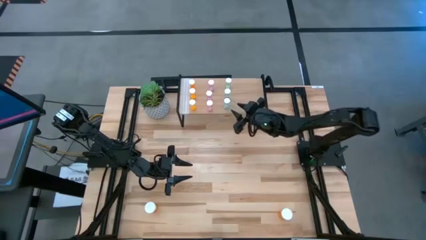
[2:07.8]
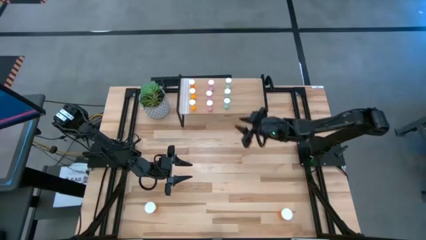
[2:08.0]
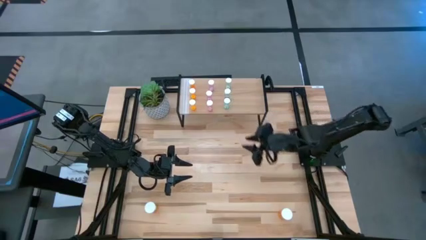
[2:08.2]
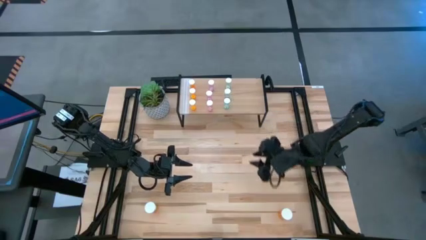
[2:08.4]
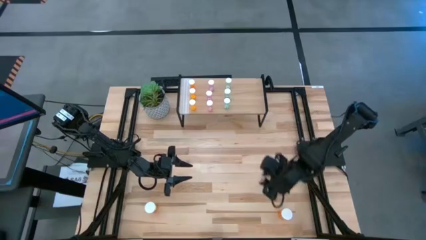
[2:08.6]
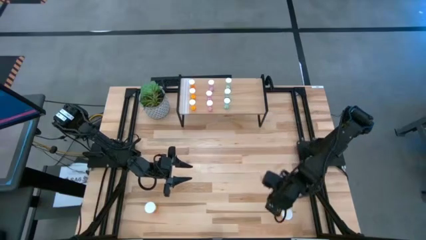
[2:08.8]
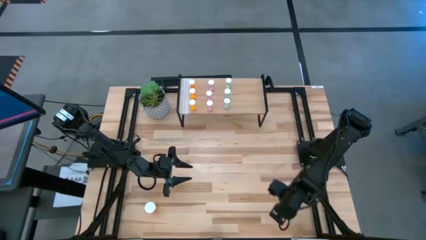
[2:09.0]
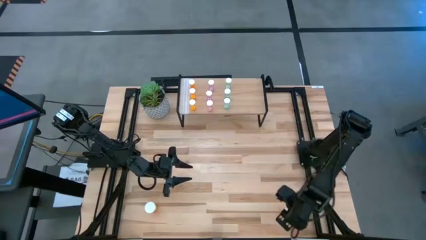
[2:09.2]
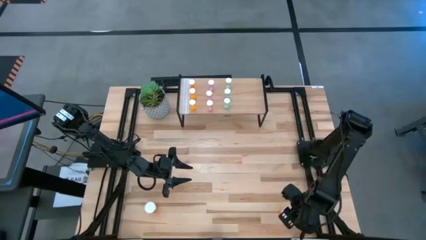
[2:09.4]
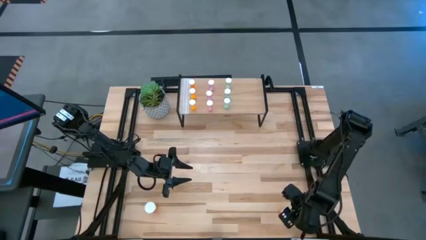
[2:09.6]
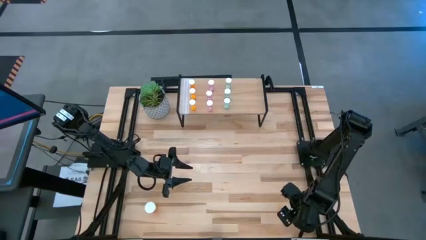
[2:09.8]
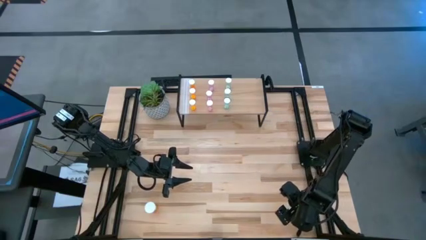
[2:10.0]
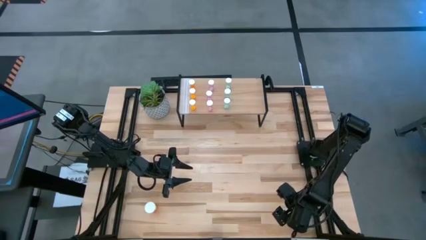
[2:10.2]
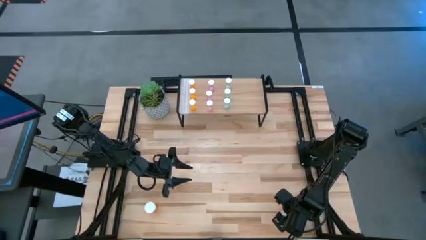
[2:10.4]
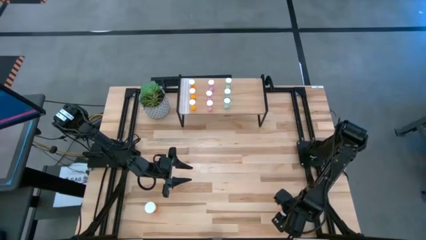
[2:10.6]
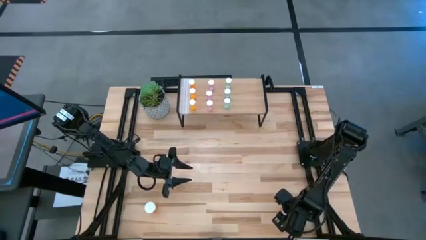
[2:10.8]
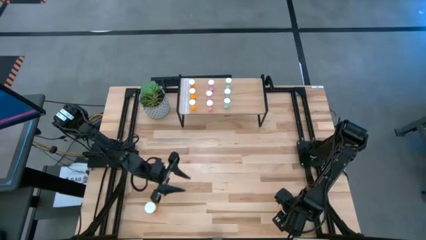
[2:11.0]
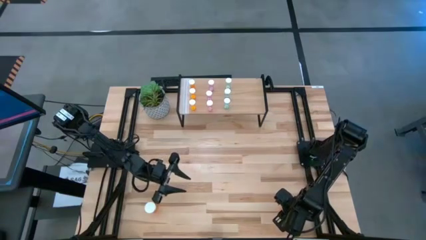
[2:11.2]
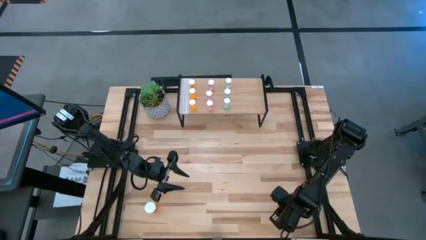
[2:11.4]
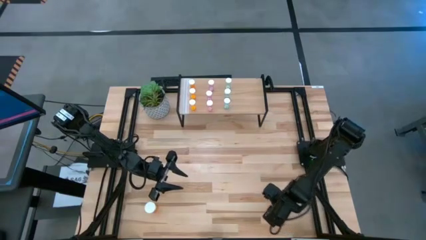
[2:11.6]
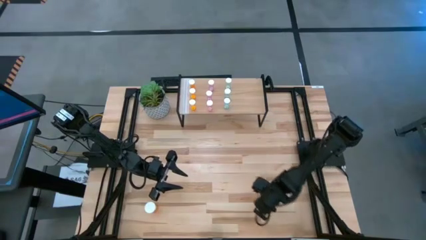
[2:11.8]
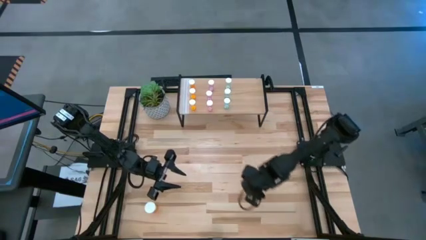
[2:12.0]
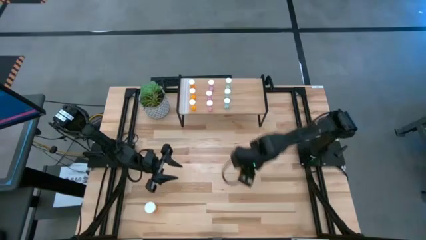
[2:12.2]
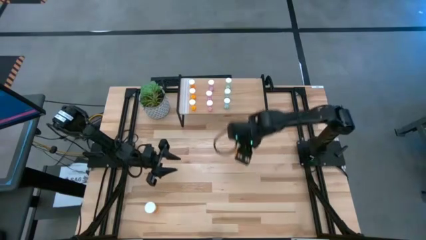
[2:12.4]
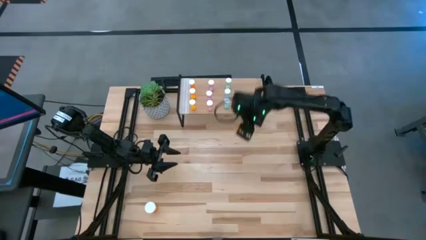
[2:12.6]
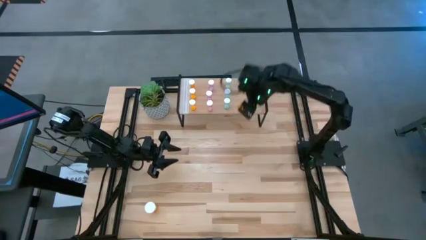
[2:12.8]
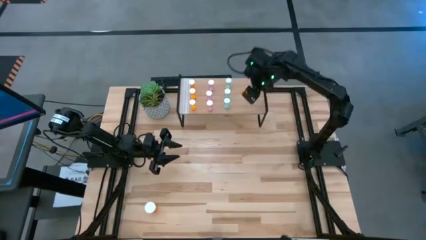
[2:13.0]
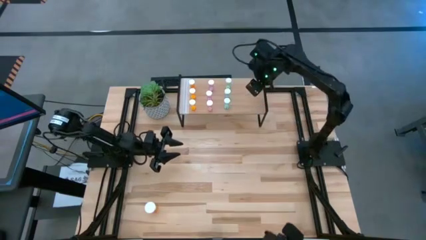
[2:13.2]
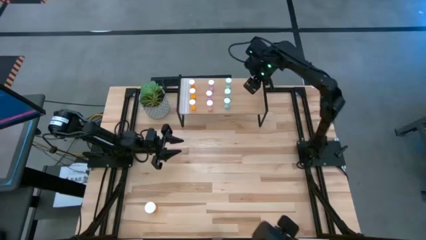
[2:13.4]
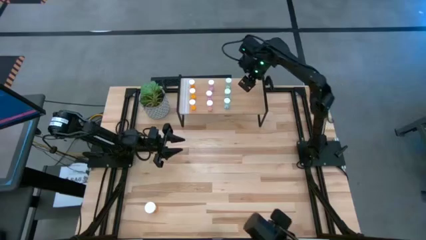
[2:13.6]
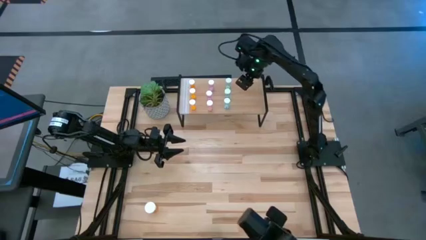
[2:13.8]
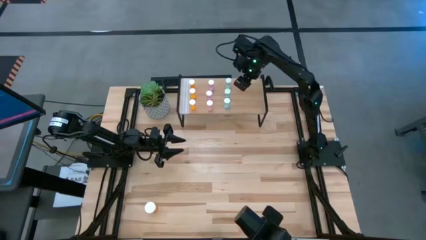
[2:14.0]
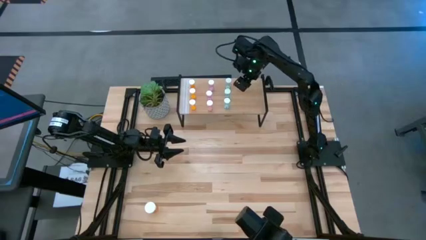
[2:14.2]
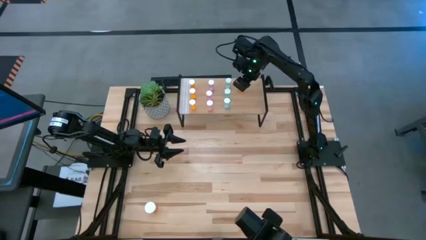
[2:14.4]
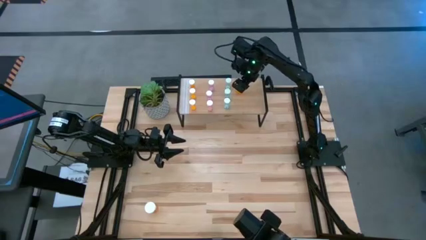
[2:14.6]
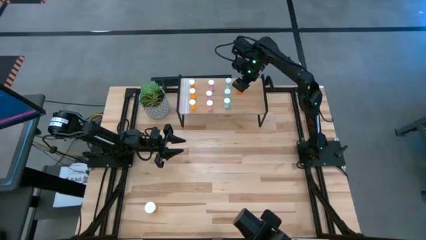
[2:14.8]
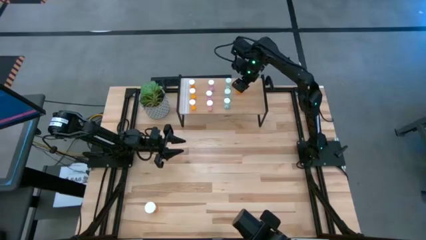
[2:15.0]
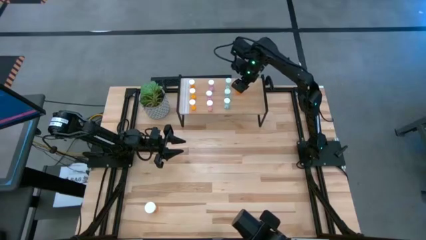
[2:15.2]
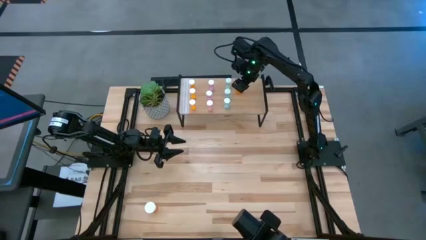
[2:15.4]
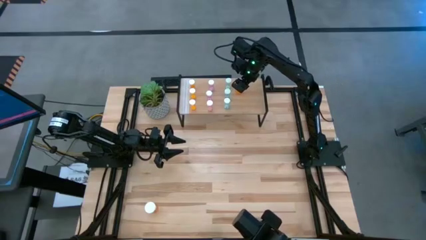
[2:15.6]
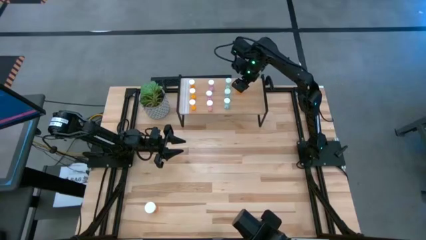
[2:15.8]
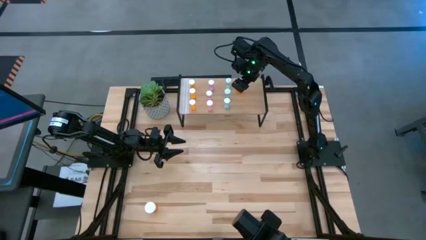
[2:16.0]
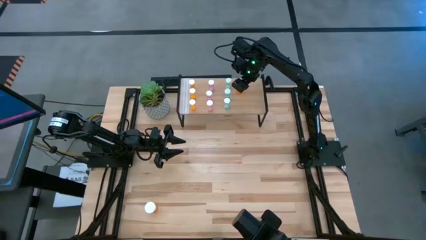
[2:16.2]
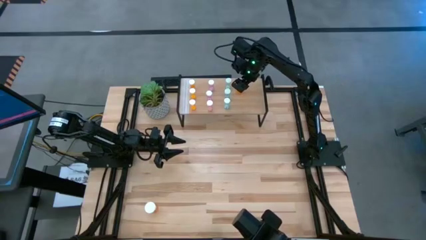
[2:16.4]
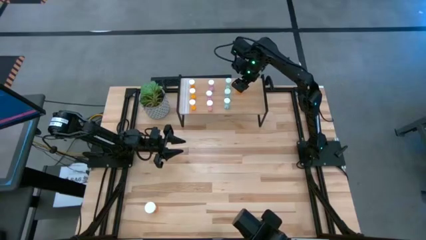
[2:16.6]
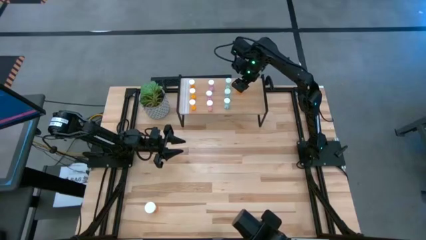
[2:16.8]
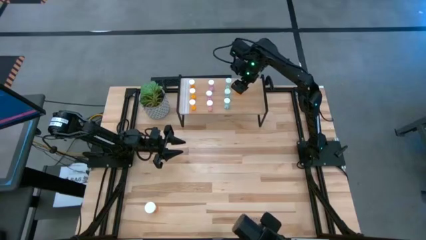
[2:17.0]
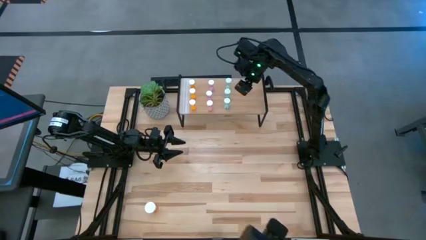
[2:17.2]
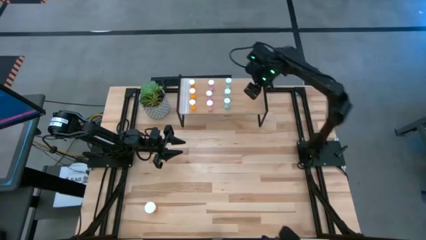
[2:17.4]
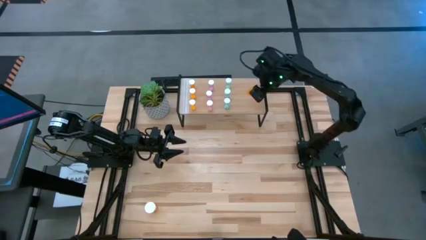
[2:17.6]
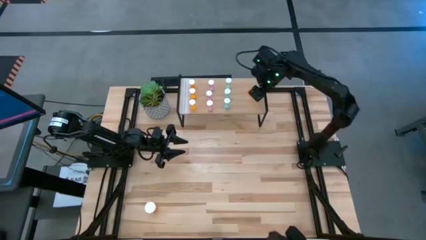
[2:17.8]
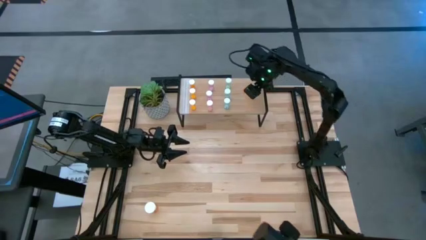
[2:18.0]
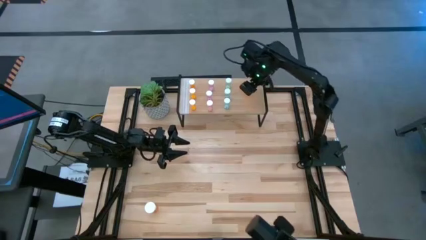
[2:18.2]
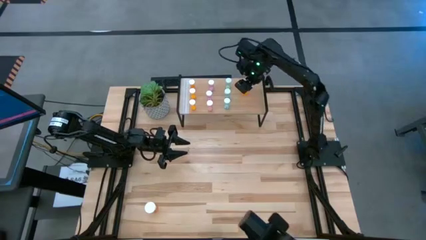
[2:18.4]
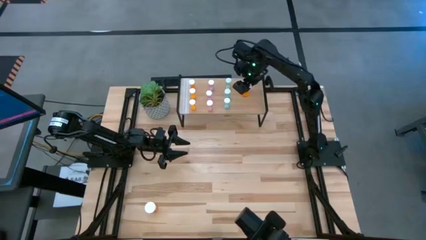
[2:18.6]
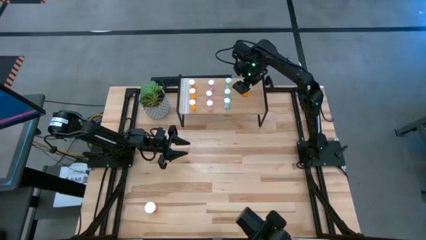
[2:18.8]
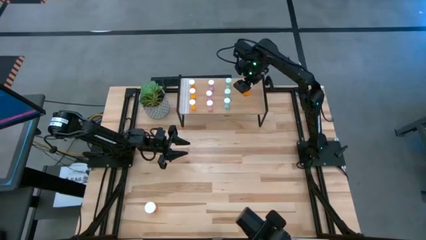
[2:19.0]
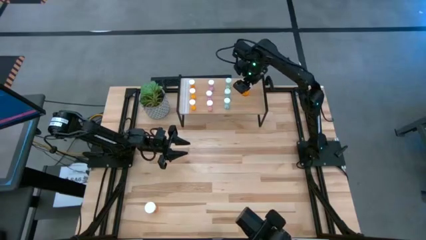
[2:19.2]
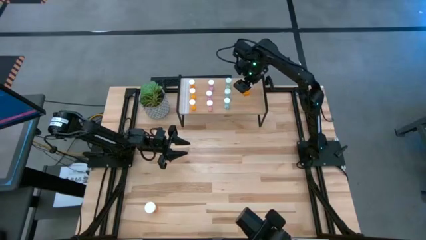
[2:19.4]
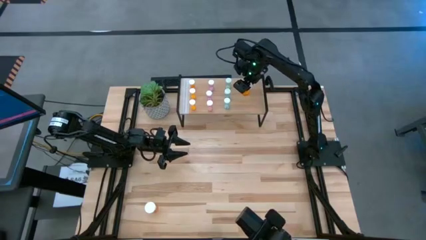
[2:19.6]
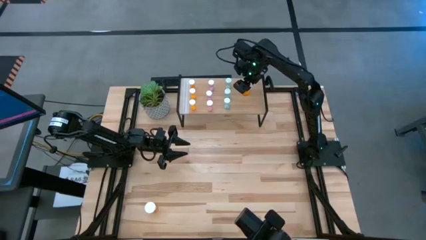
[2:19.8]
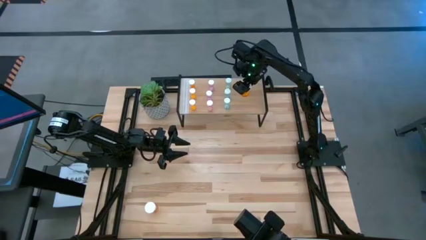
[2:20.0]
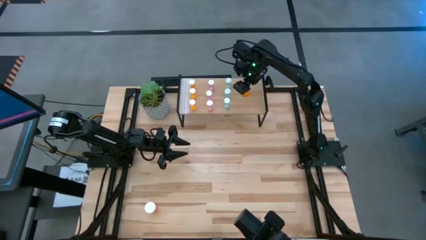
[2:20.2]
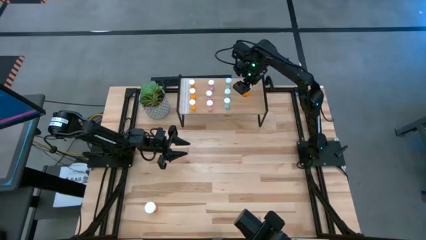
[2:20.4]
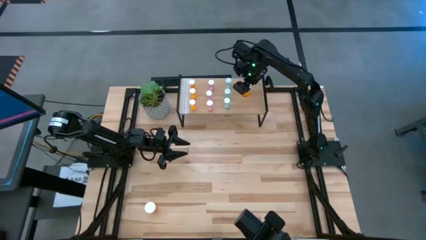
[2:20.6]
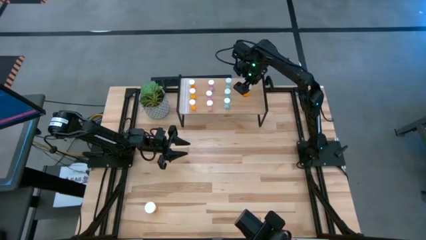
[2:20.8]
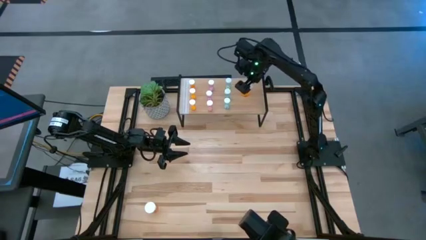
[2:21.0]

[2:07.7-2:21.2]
Task: Pick and place medicine bottles onto shelf by color
Put the right big orange pill bottle on the shelf
